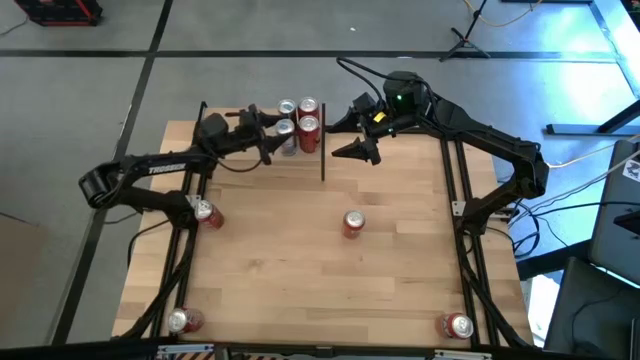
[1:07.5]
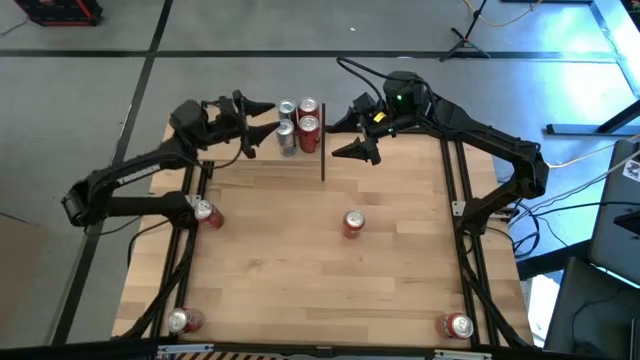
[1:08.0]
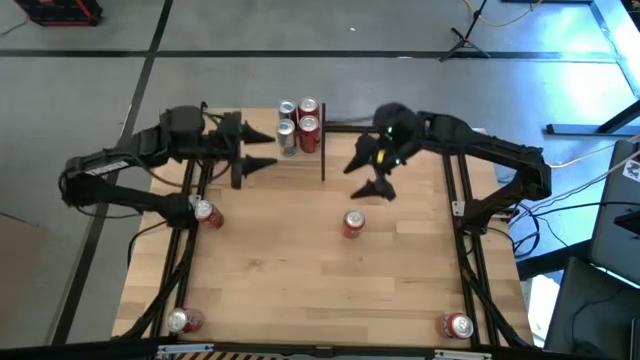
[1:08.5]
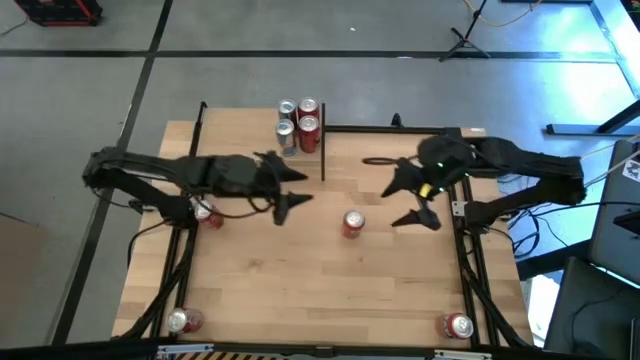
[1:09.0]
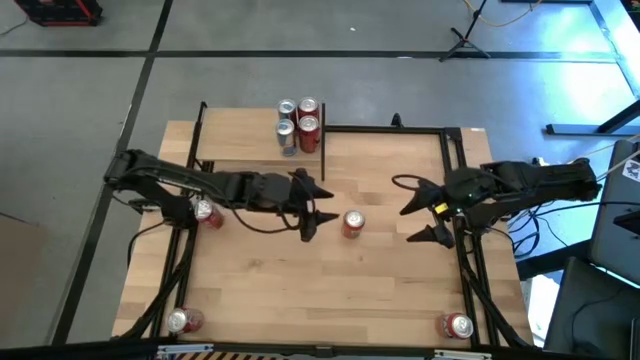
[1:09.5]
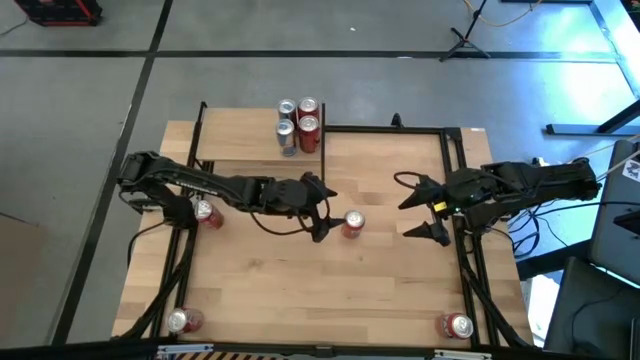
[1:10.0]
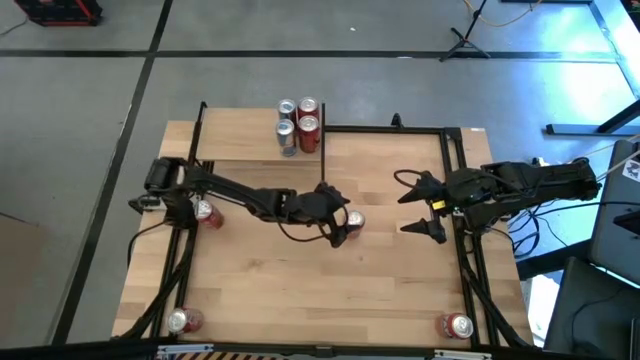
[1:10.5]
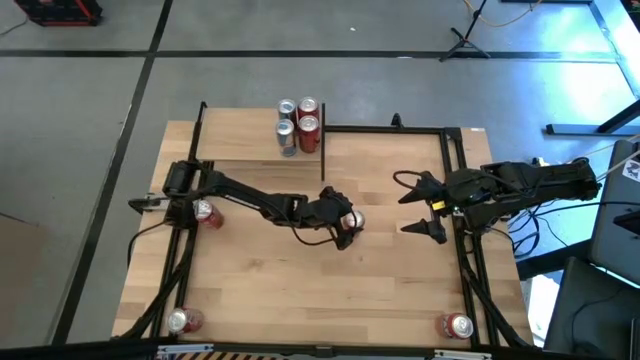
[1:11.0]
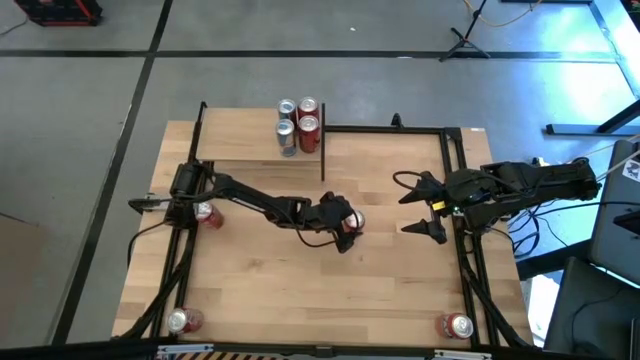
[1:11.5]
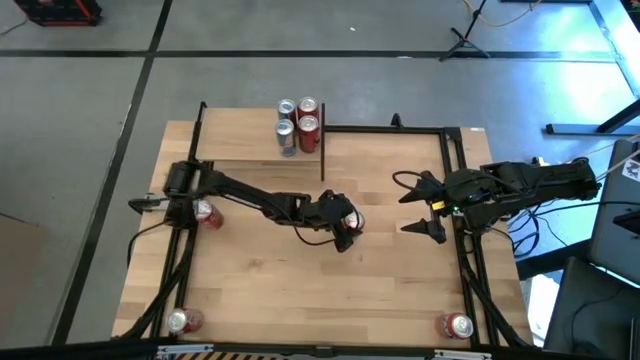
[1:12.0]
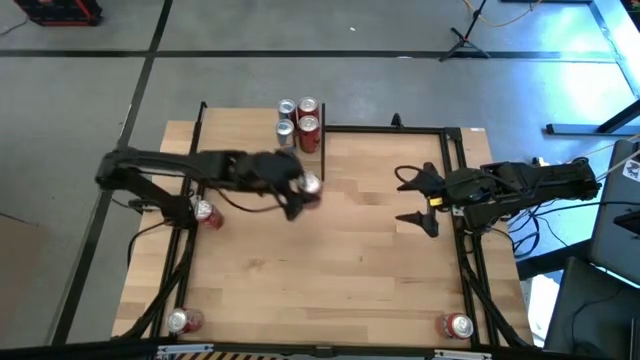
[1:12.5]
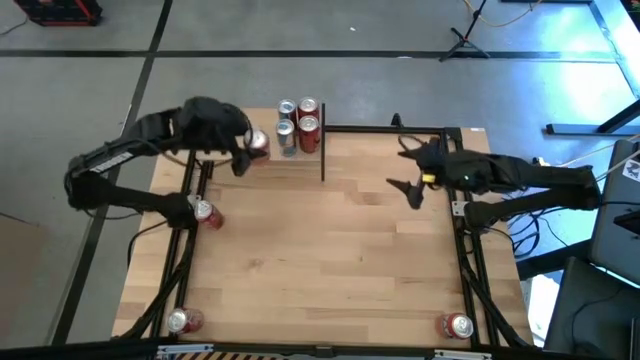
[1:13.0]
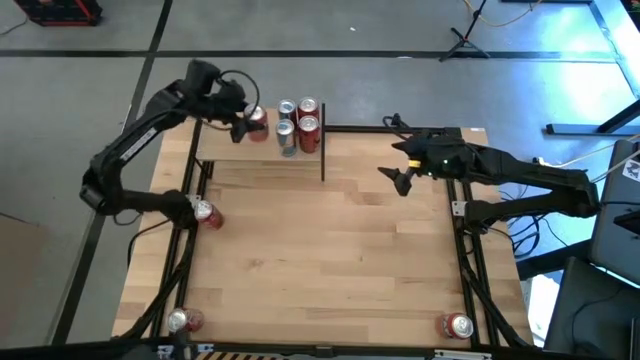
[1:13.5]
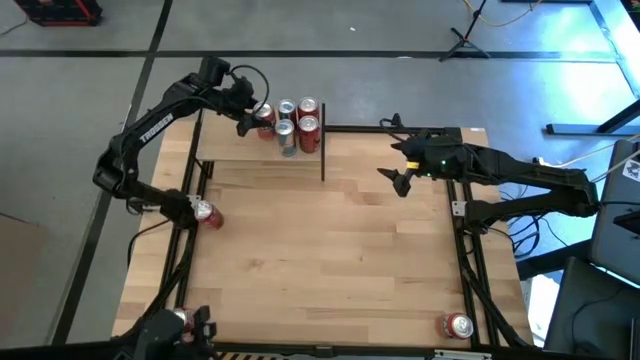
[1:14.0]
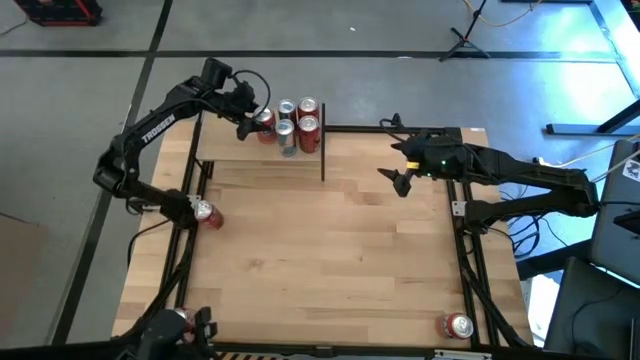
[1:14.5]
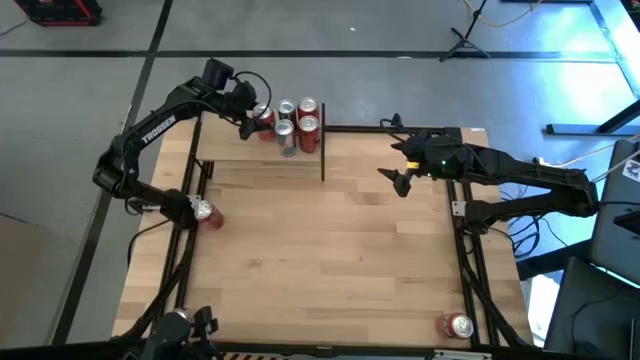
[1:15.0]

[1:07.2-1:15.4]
Task: Place canned beverage on shelf
Put the top red soda can on the shelf

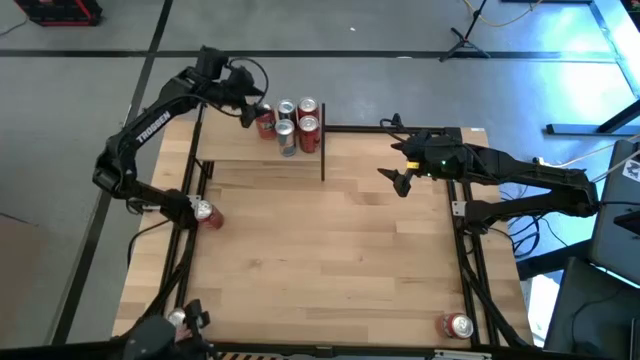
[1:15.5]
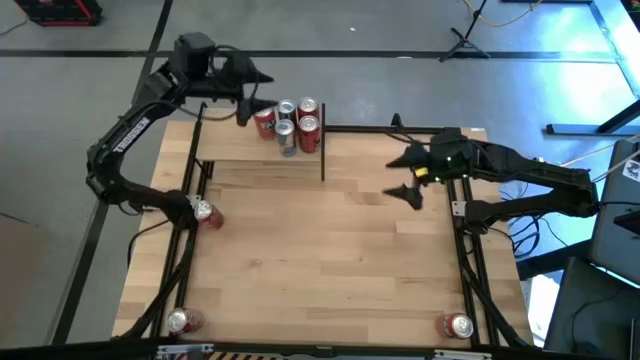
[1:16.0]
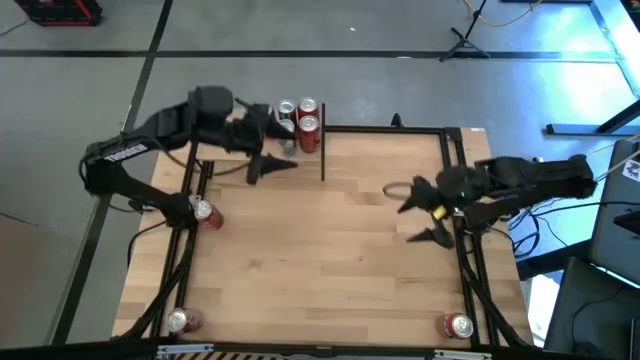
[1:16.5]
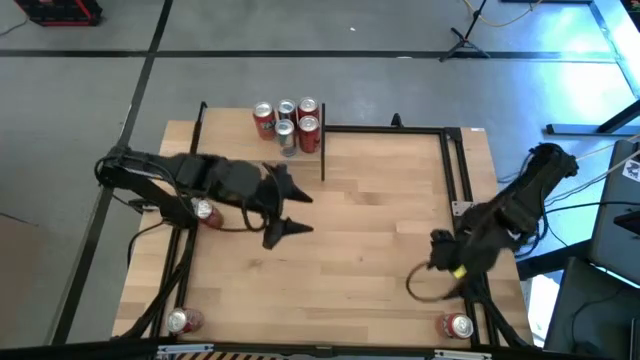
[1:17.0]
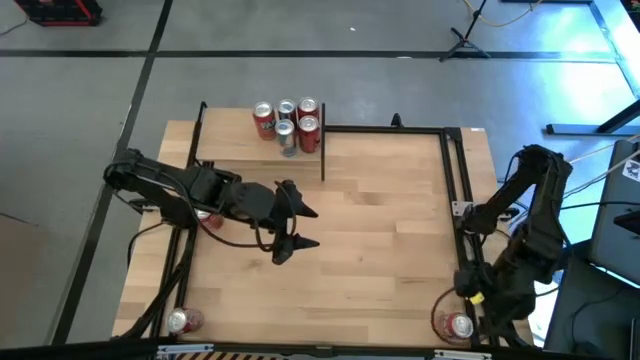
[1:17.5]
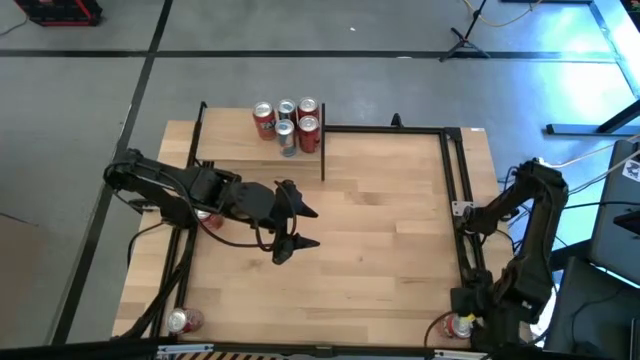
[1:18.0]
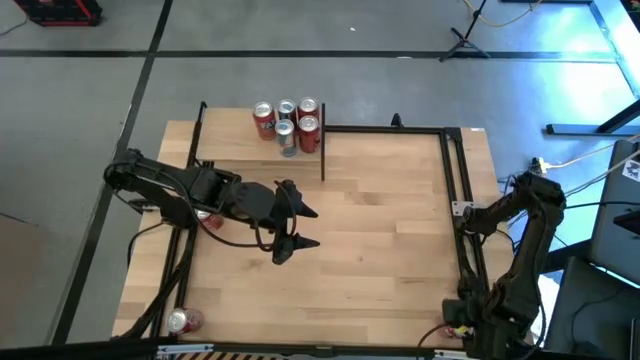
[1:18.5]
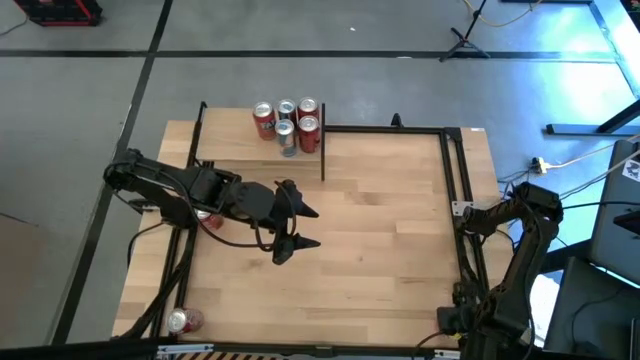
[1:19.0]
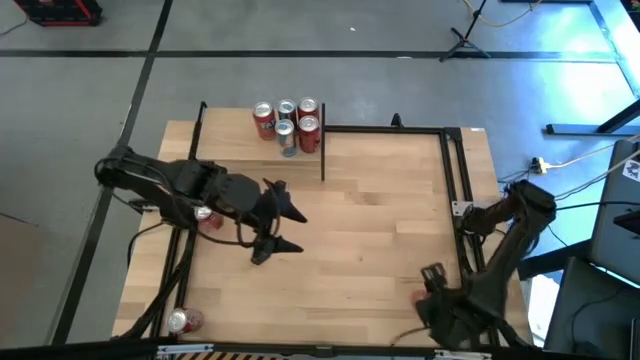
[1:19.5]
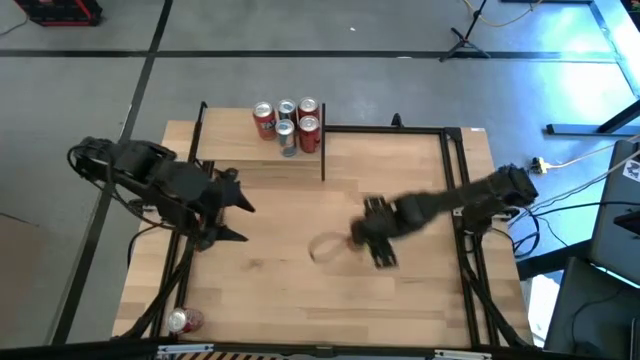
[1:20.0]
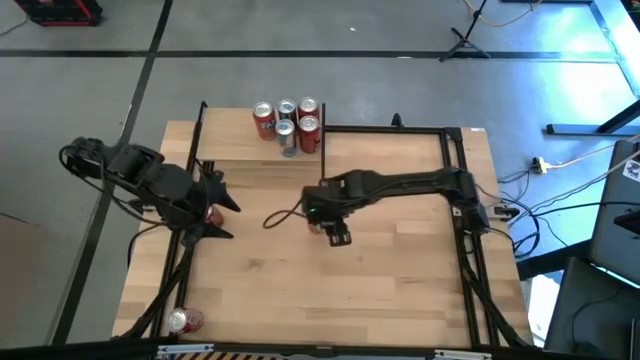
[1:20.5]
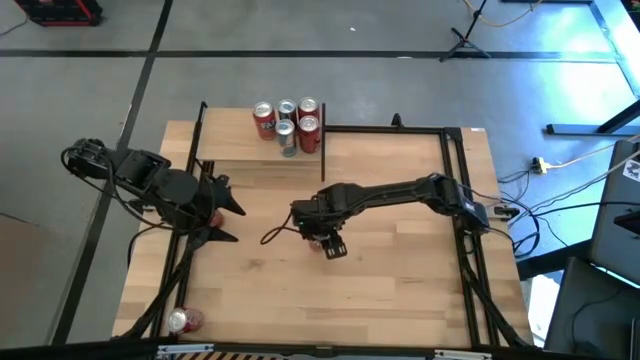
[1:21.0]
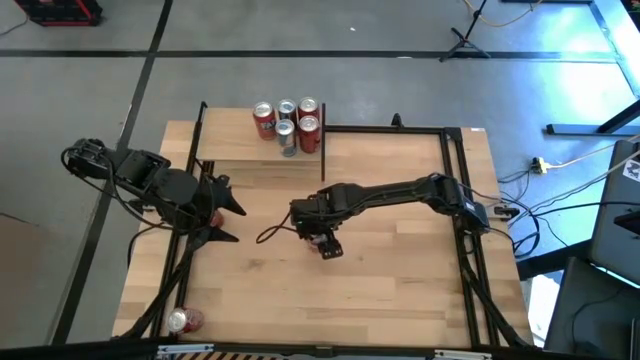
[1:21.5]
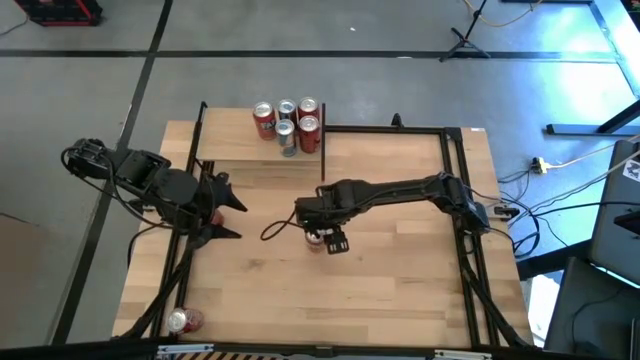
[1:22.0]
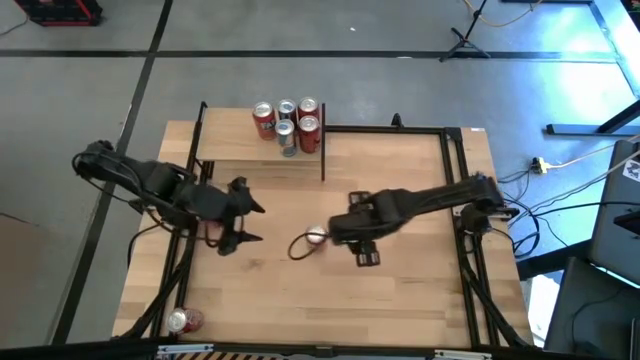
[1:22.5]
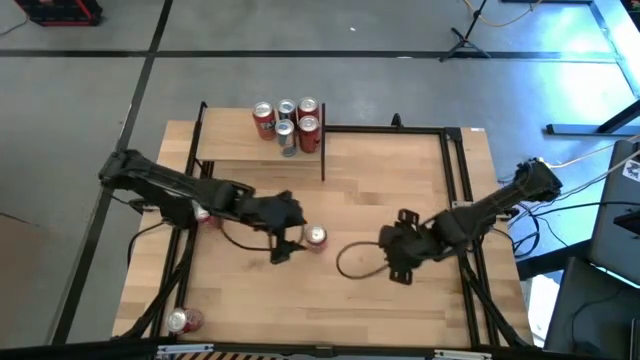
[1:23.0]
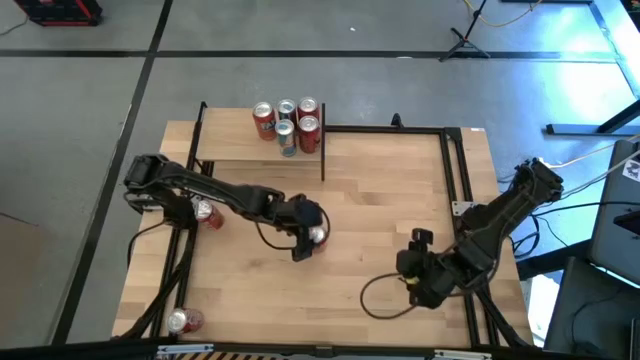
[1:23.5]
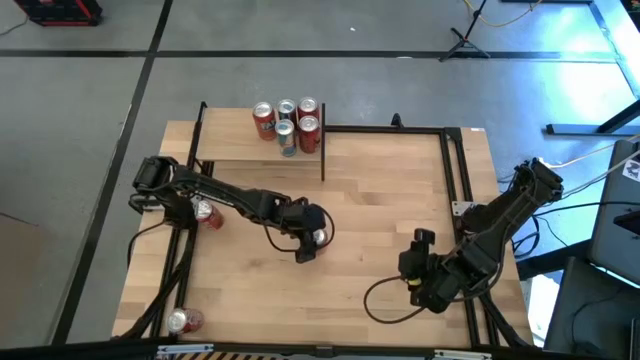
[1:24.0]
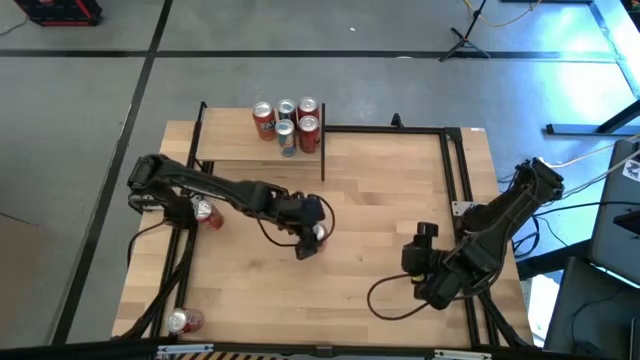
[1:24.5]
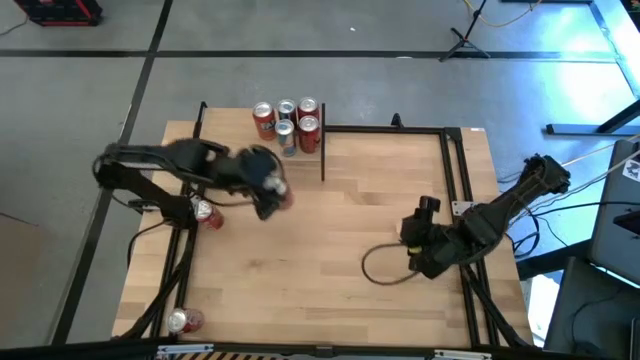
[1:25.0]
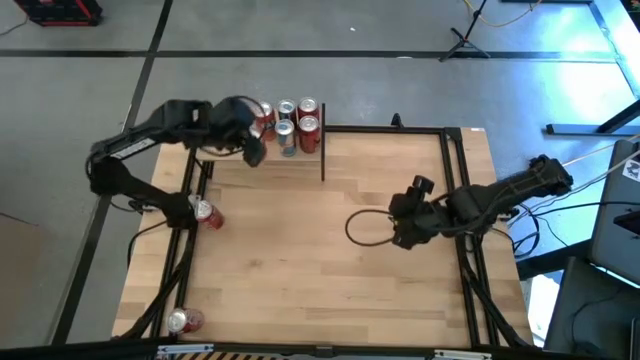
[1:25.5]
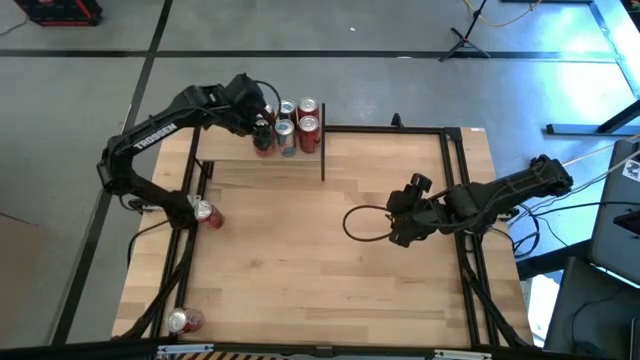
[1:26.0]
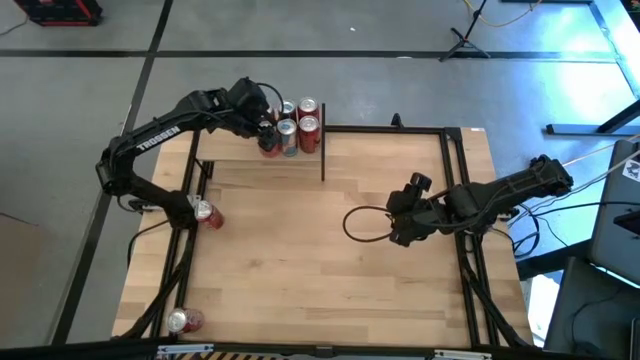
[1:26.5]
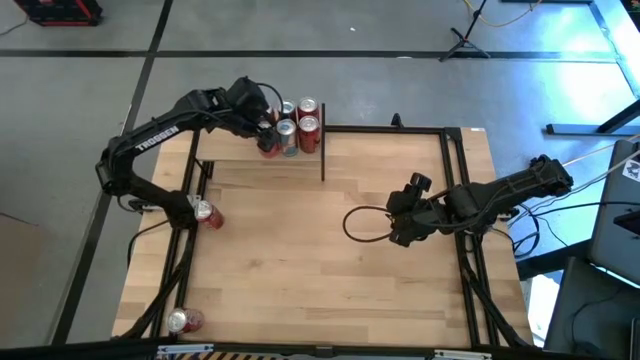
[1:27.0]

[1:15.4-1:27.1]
Put the red soda can on the shelf aligned with the other red soda can
